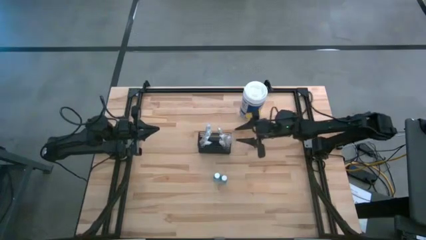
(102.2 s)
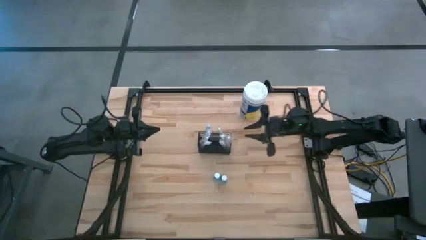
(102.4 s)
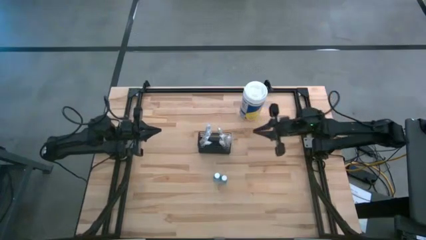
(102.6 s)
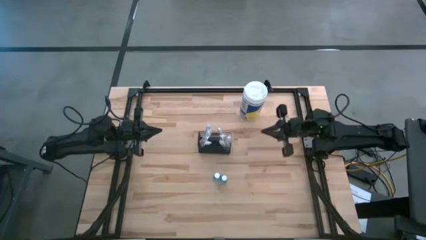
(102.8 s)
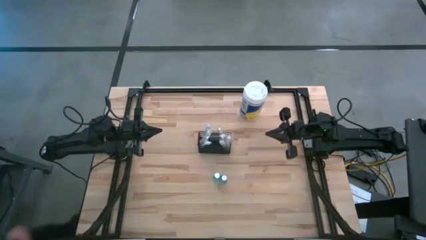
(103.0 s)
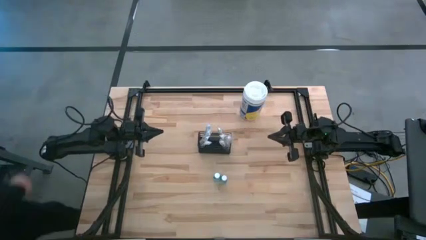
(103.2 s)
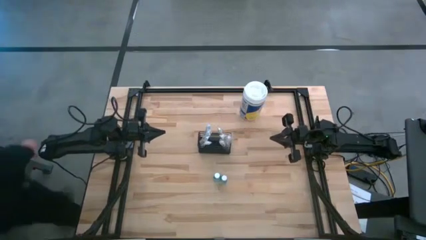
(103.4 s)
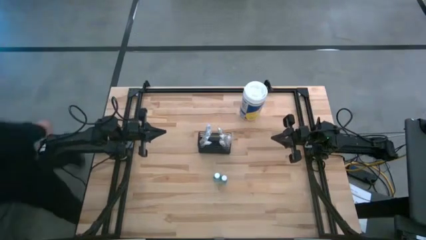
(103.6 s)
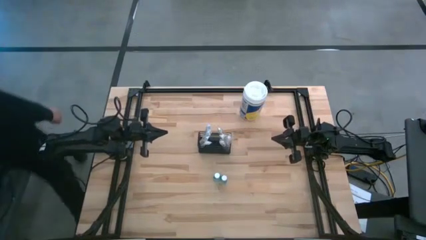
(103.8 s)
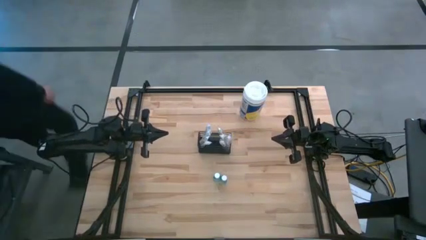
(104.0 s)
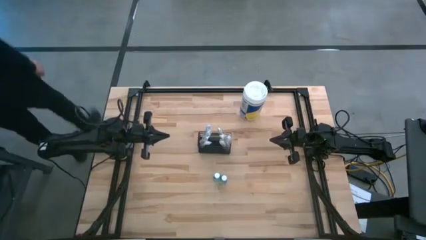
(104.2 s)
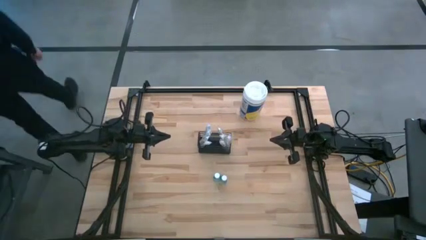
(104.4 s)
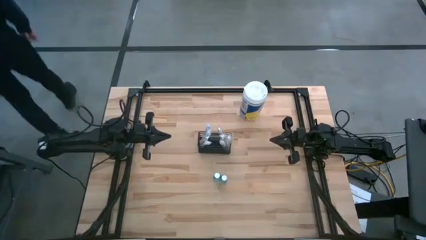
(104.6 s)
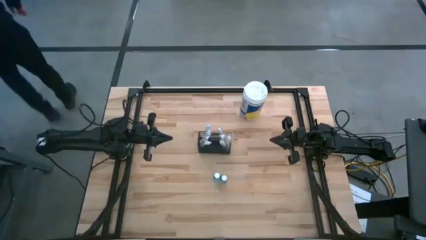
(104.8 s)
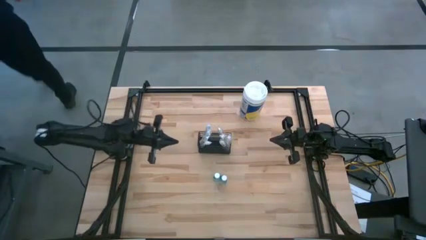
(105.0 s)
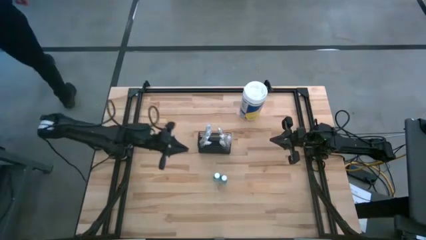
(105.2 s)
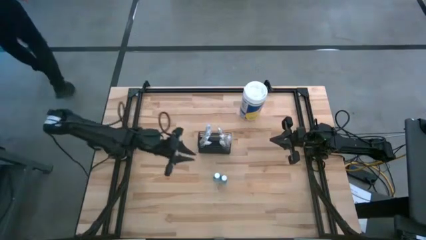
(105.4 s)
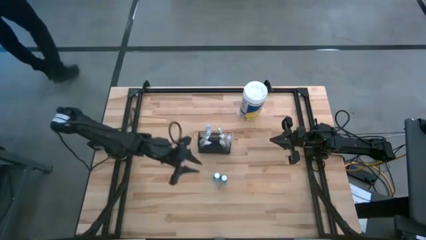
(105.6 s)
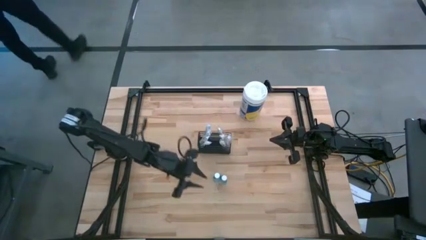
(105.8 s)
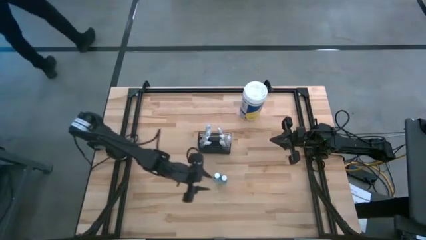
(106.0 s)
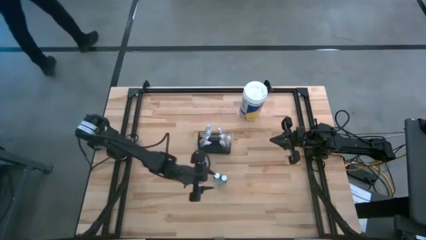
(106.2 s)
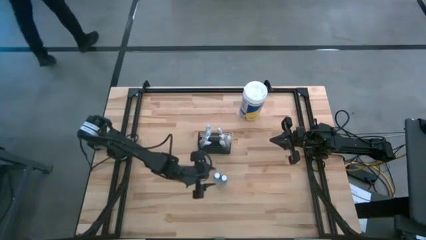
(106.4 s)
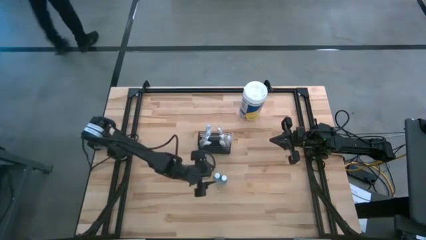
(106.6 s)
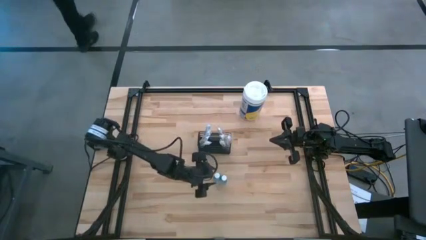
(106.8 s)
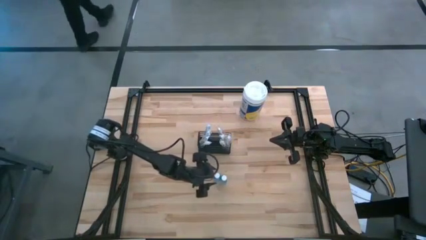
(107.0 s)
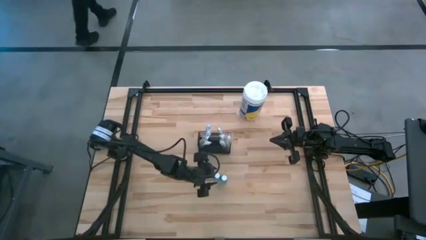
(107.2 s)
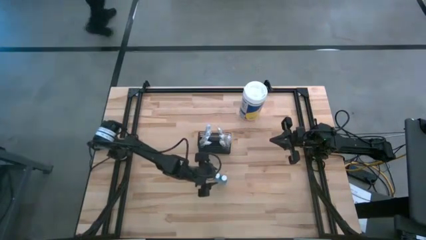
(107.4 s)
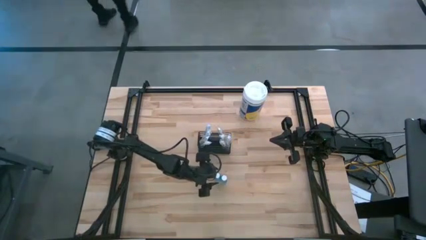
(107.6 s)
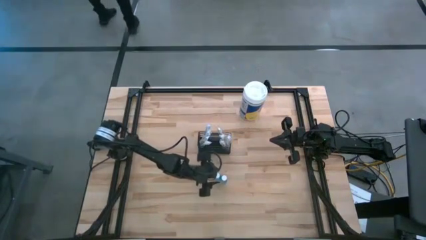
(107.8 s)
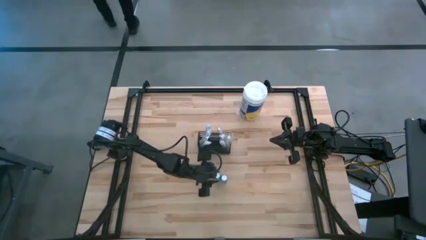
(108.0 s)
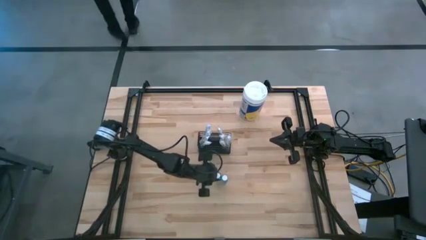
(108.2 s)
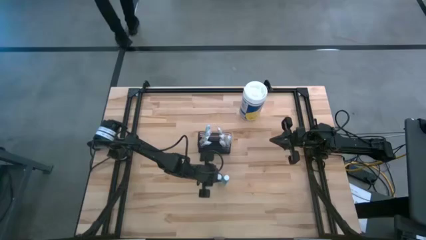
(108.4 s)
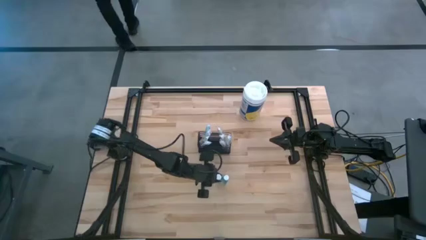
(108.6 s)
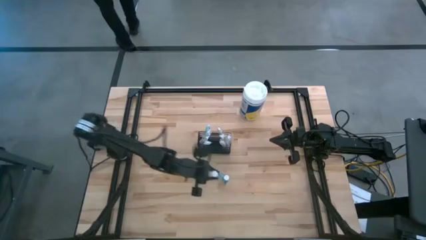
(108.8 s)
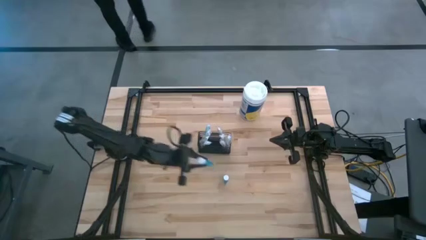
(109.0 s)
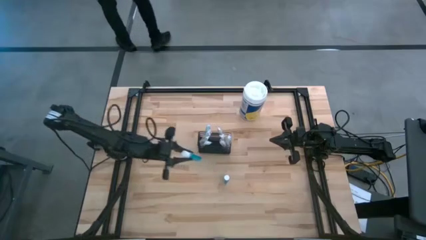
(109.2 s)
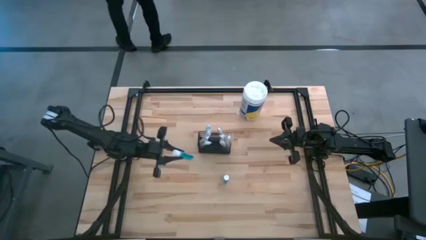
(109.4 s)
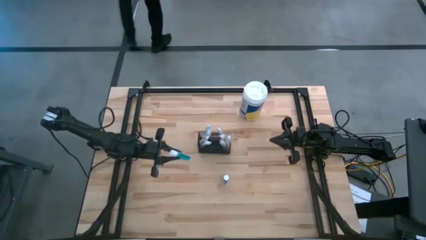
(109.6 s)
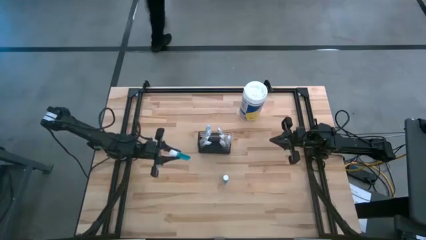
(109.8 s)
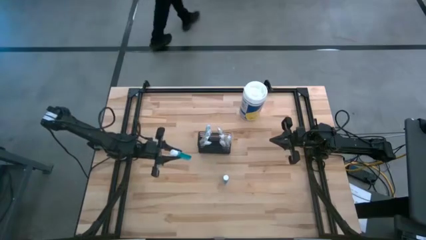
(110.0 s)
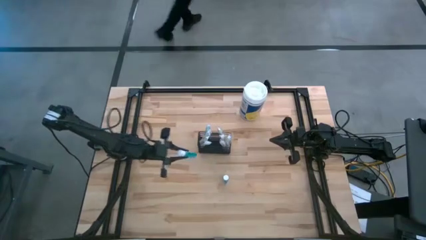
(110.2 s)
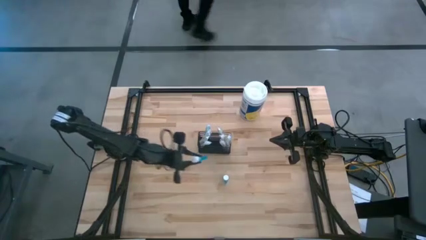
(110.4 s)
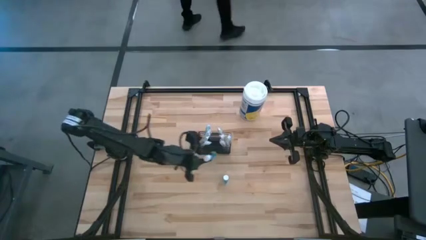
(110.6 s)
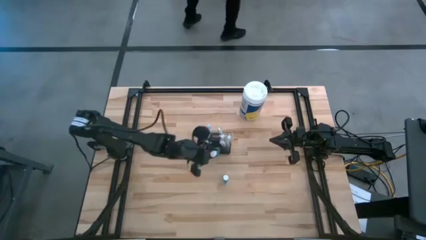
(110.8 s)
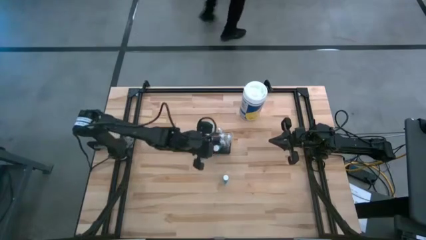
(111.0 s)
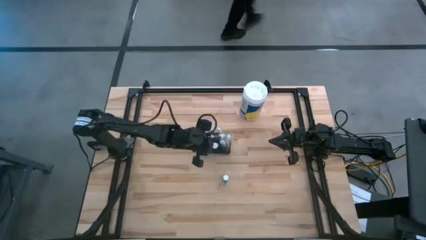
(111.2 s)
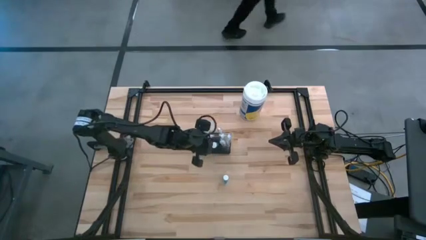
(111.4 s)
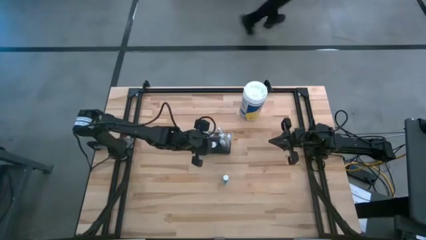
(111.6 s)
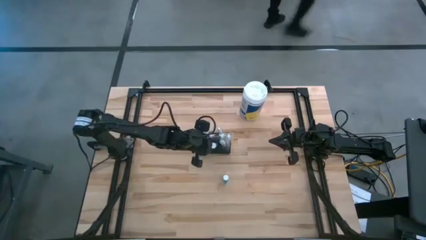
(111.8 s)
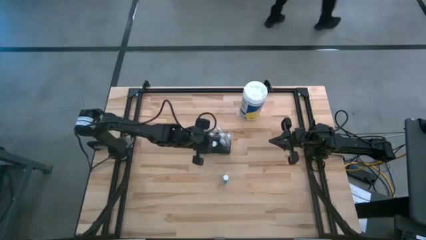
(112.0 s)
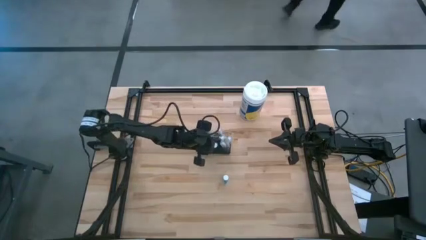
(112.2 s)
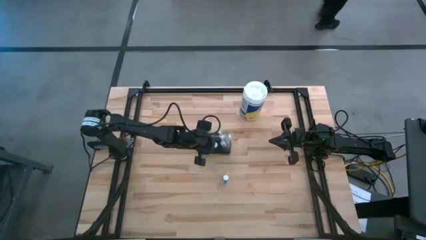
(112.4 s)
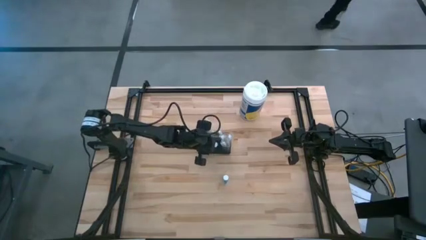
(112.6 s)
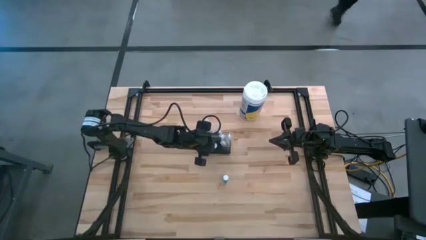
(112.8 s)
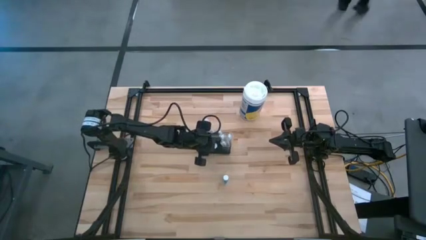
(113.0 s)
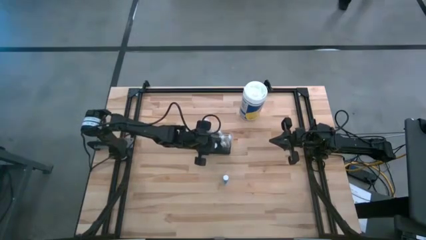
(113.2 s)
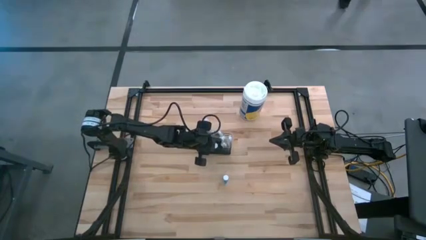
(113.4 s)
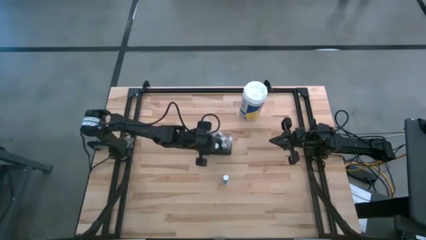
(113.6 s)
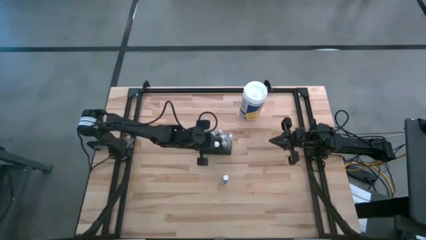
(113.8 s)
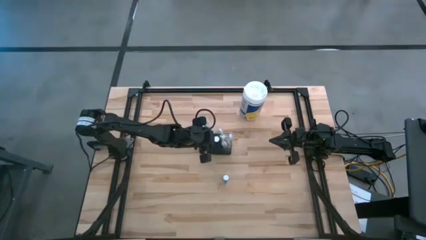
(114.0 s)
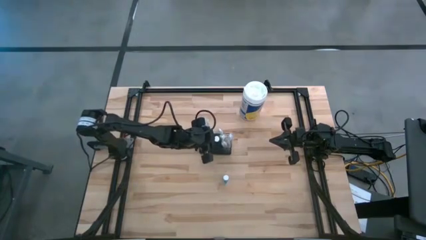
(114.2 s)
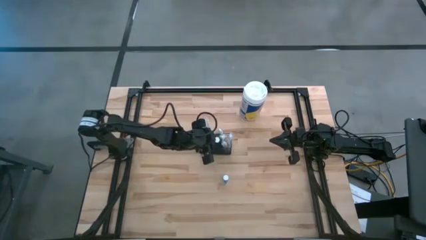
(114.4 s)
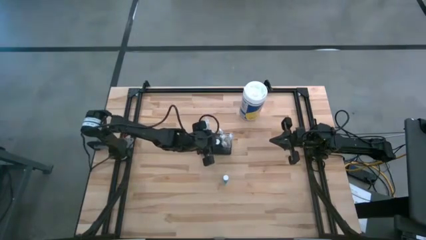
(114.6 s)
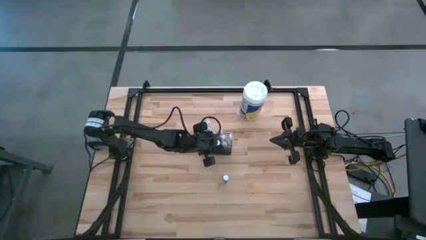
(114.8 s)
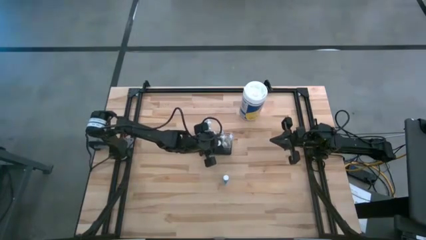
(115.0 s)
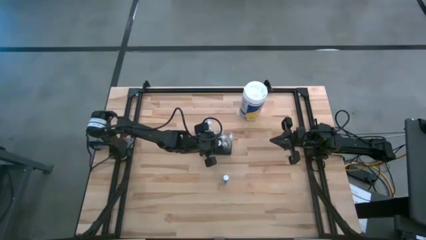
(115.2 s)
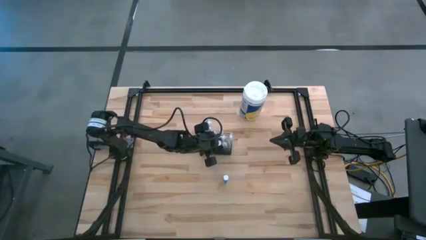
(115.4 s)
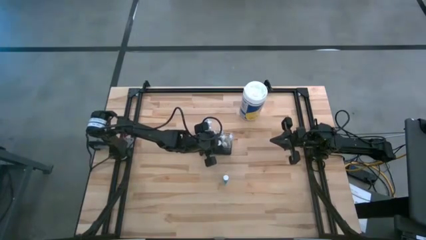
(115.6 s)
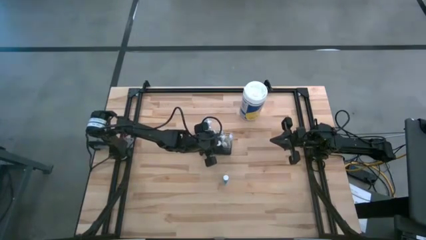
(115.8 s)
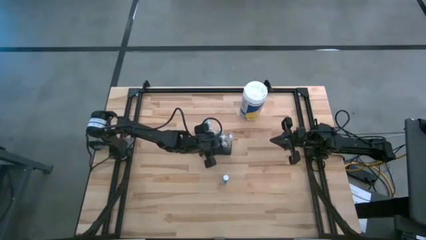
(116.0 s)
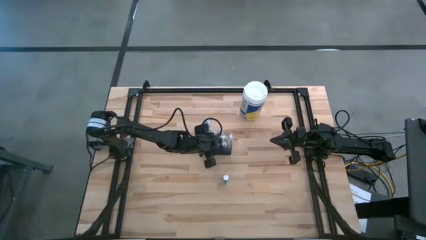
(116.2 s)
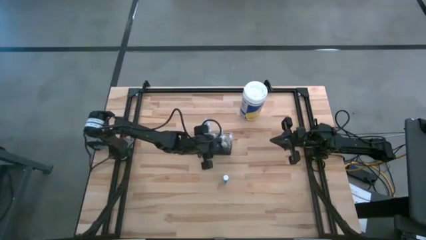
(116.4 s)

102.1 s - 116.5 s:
Task: Pick & Place toothbrushing station
Put the mouthwash into the black wire organizer
